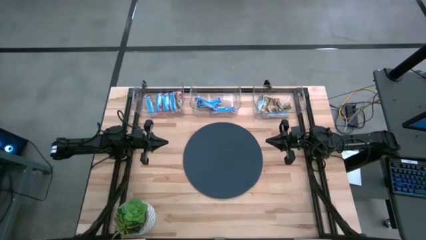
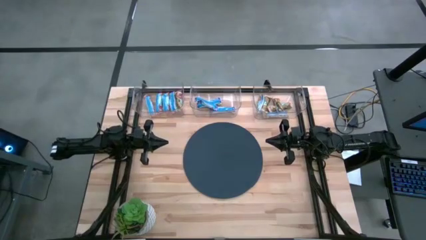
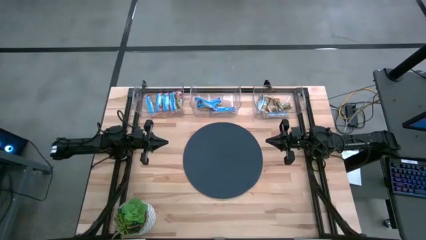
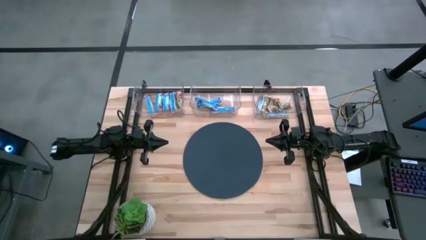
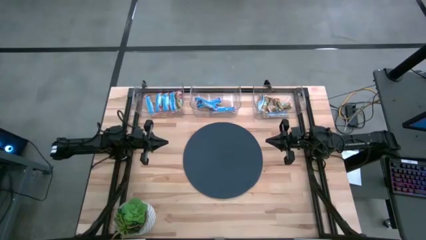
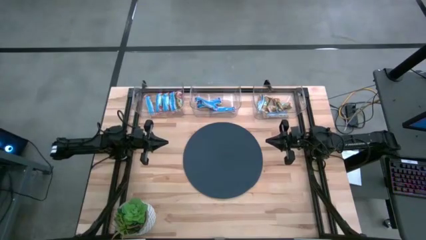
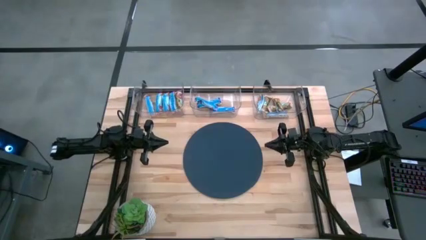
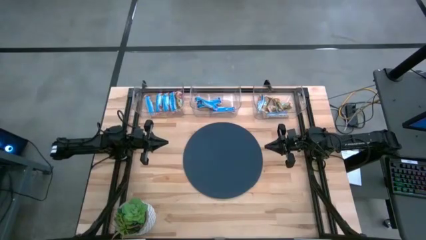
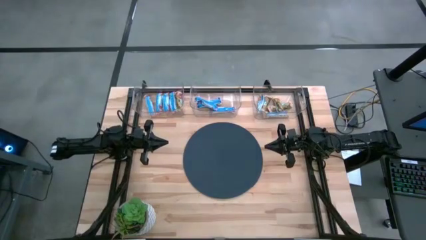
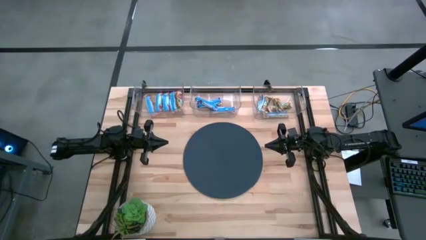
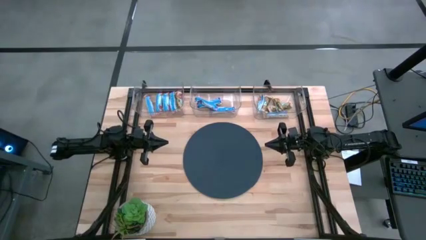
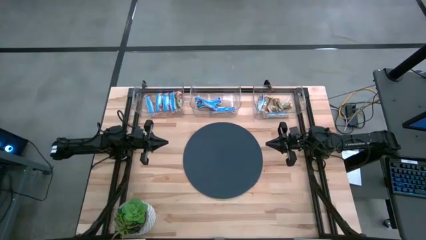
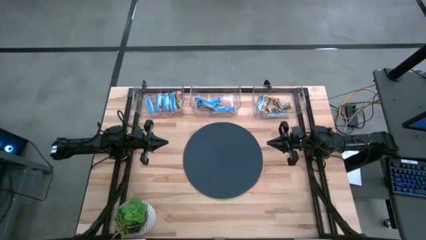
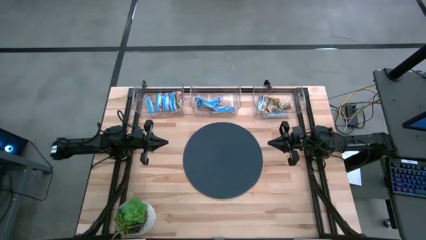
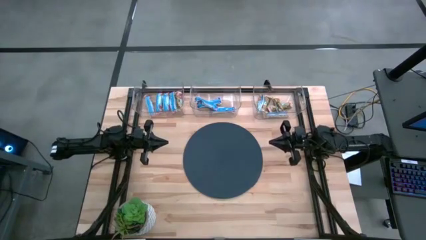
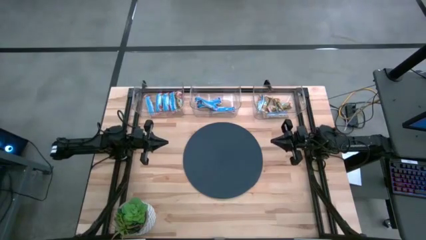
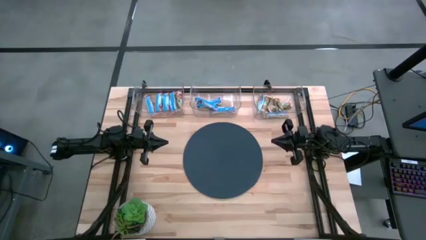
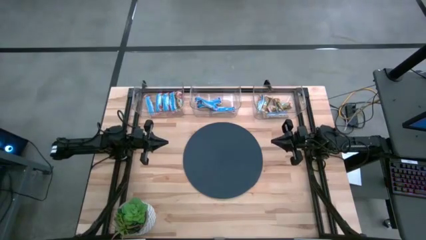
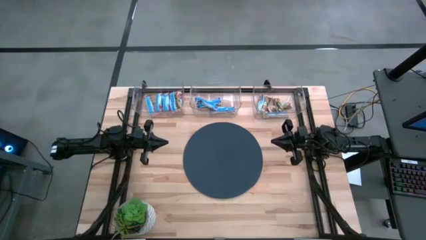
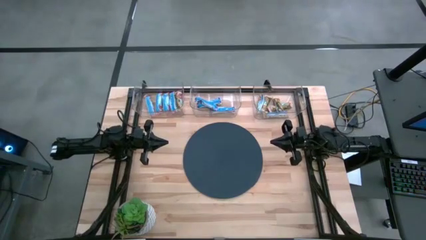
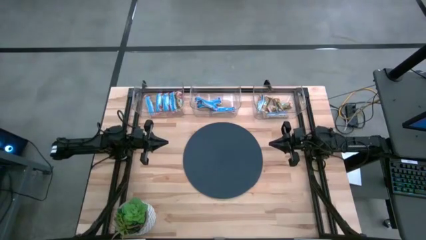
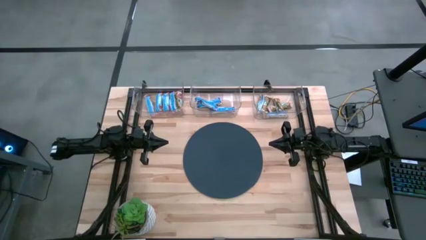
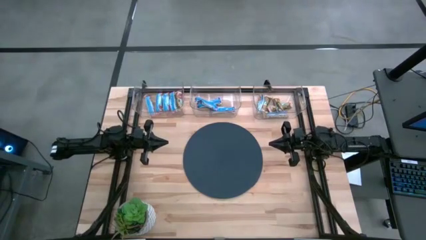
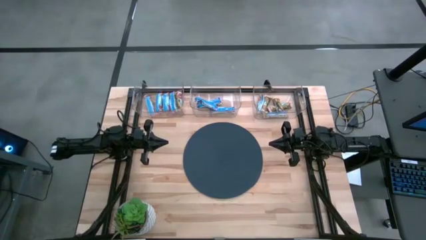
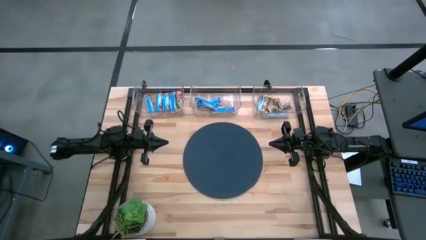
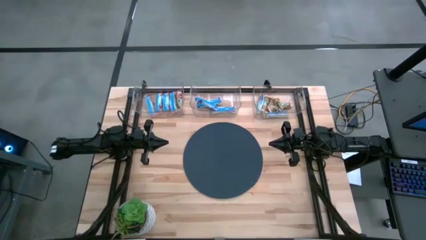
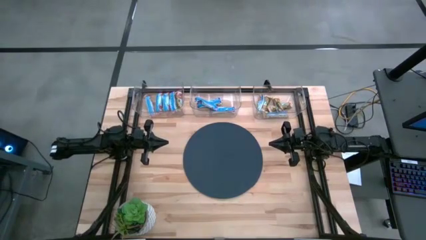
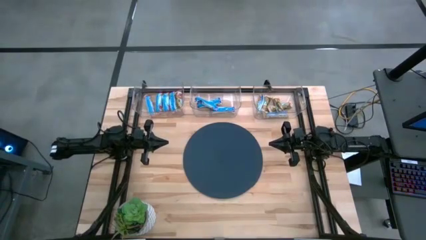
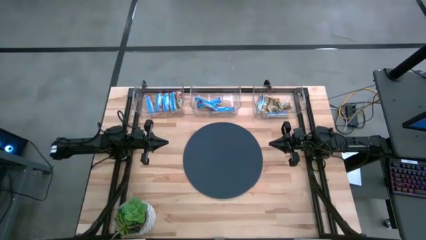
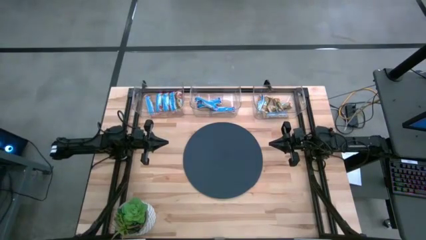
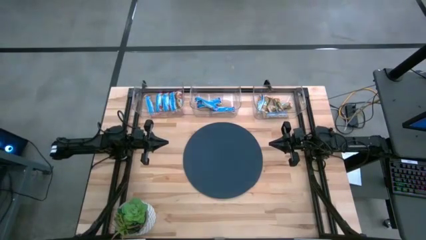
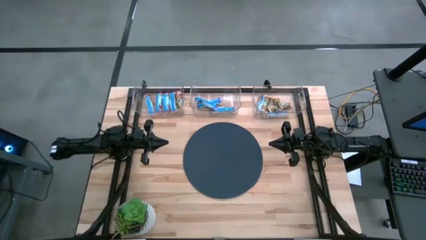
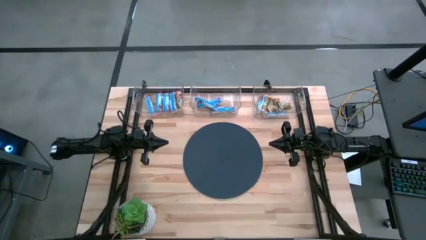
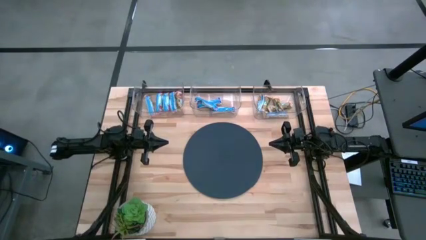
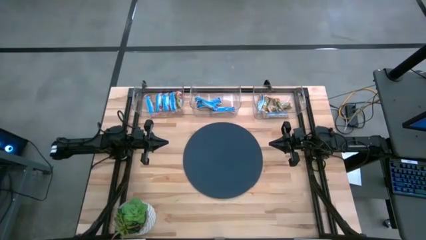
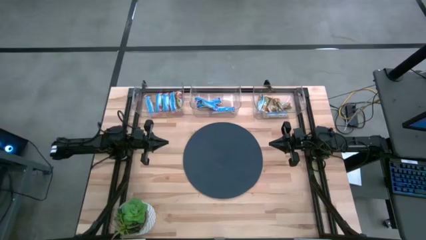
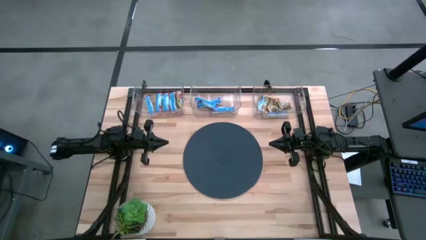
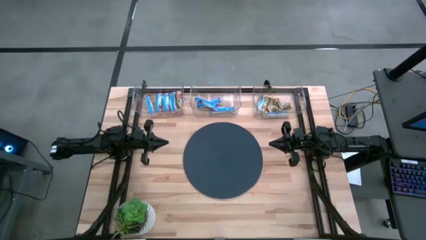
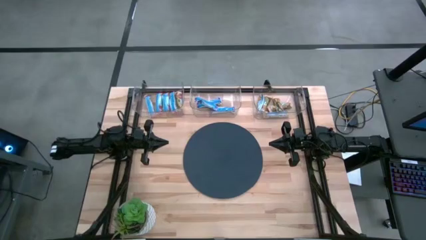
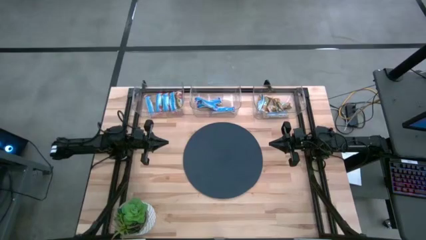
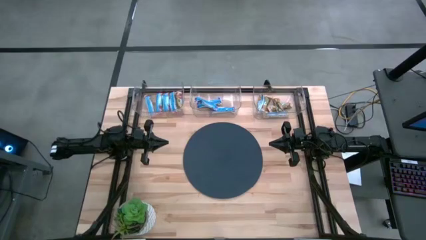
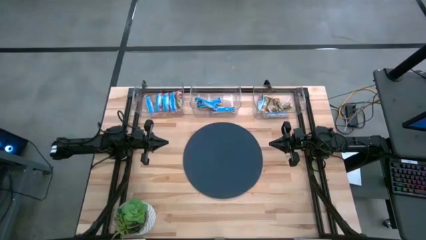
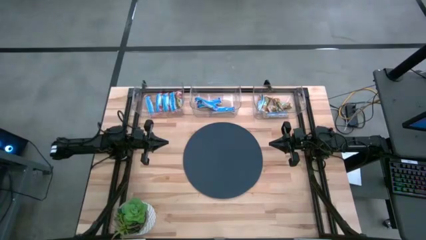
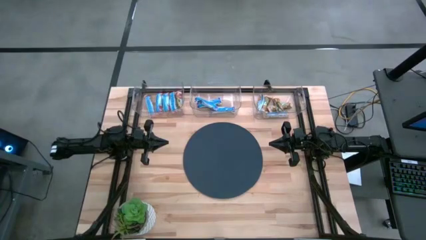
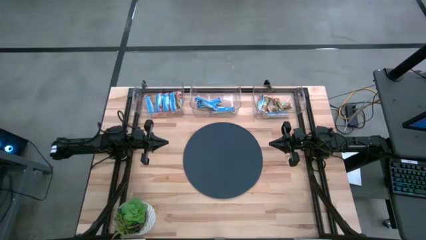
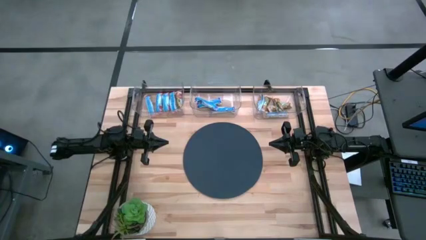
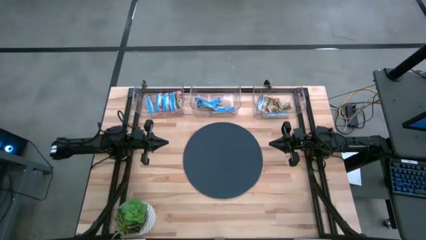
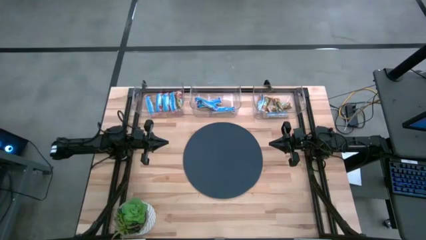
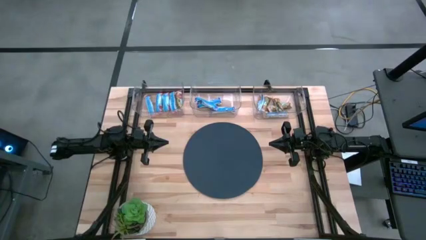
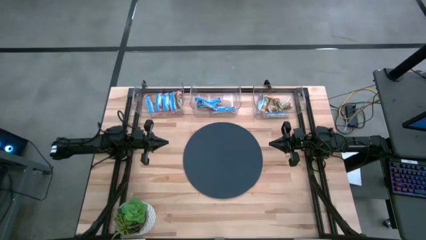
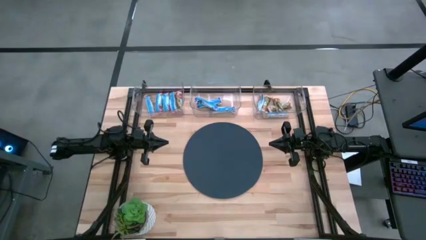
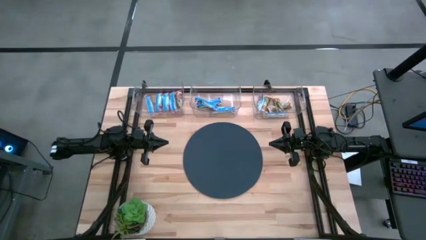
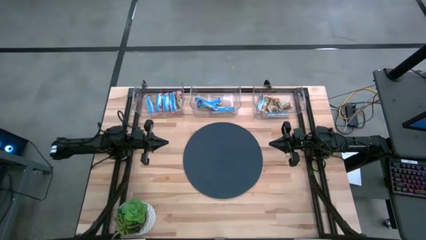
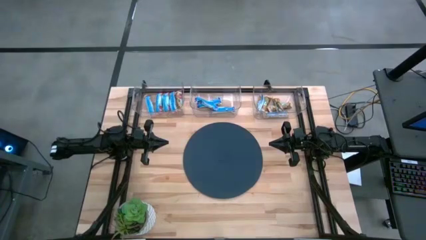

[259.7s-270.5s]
Task: Pick and place Granola Bars by type
Return to Home Position
